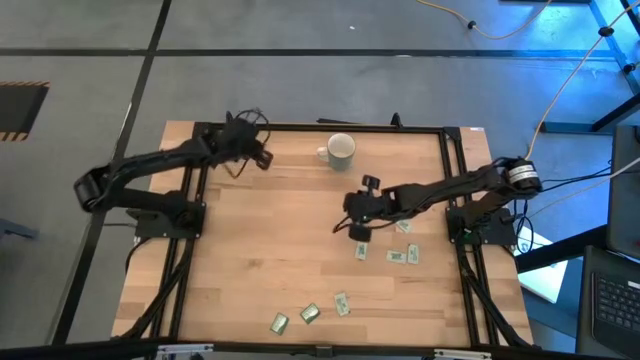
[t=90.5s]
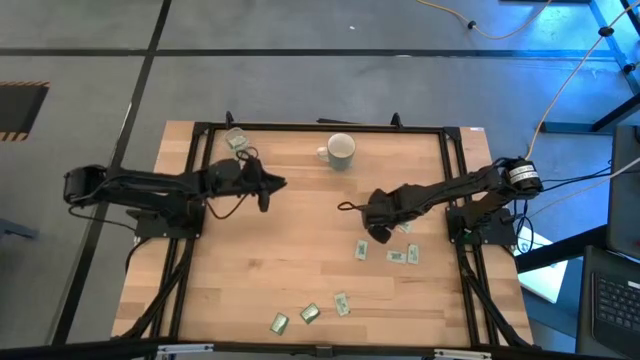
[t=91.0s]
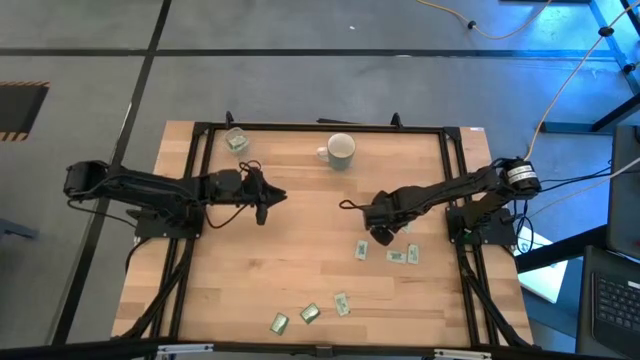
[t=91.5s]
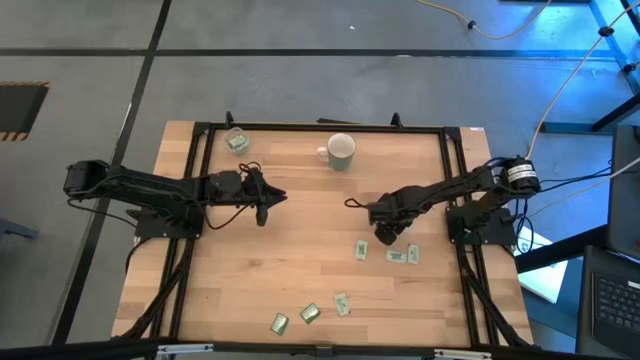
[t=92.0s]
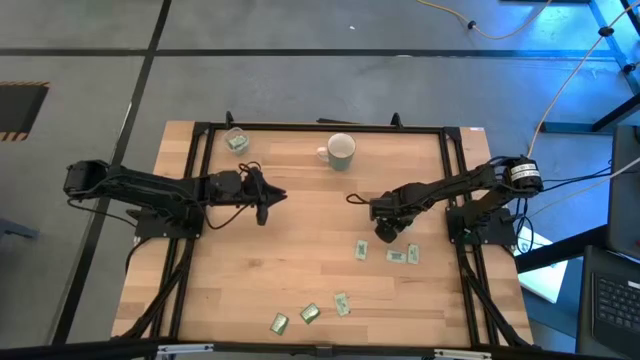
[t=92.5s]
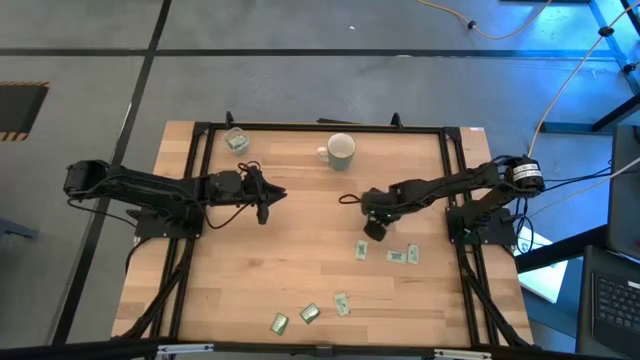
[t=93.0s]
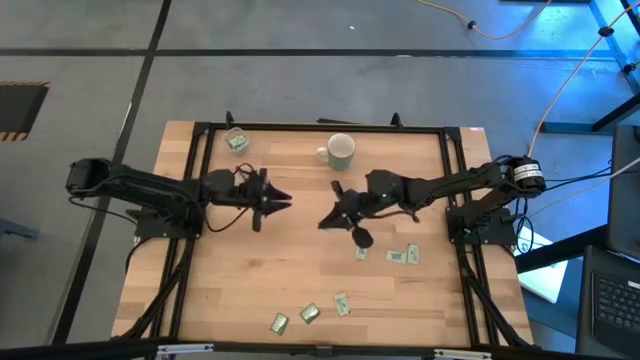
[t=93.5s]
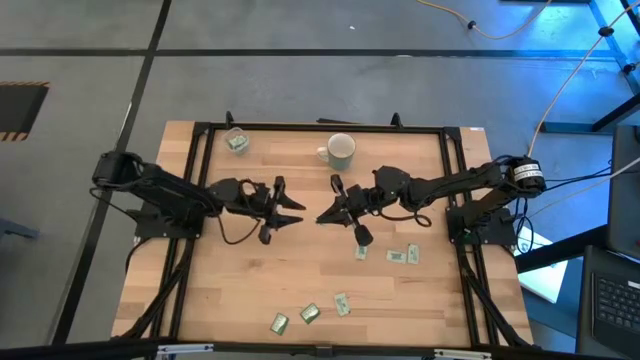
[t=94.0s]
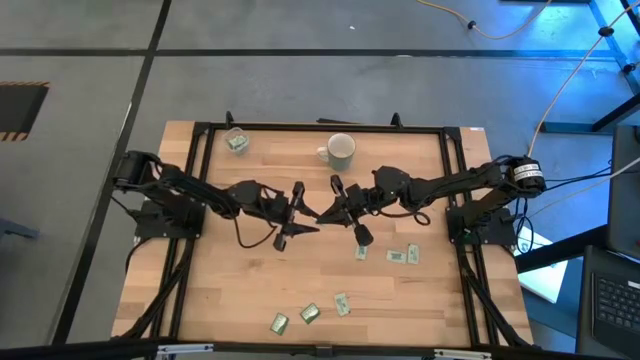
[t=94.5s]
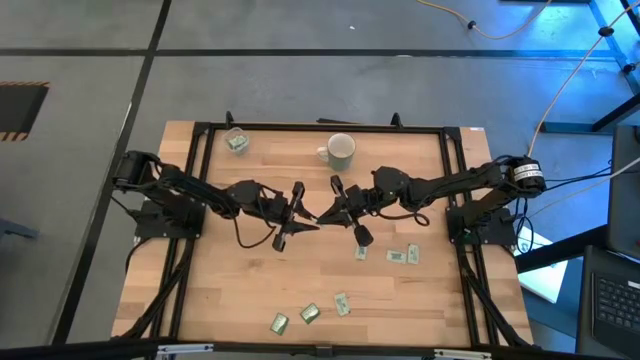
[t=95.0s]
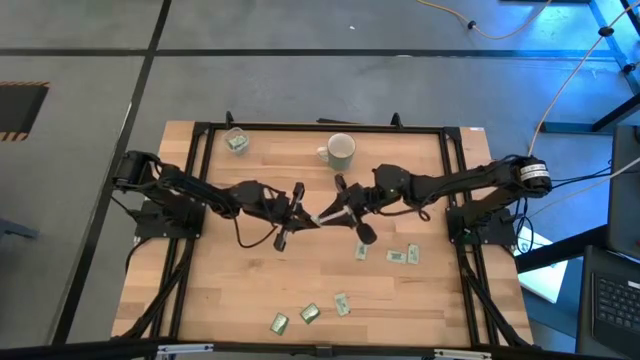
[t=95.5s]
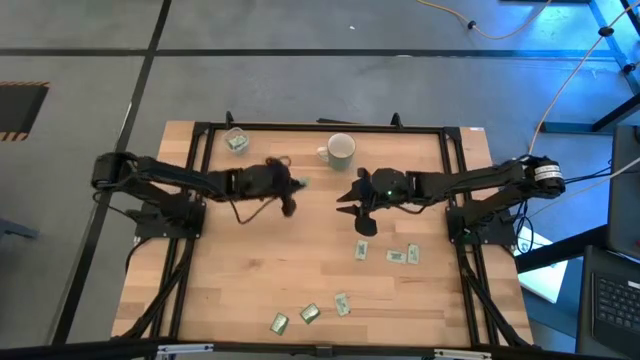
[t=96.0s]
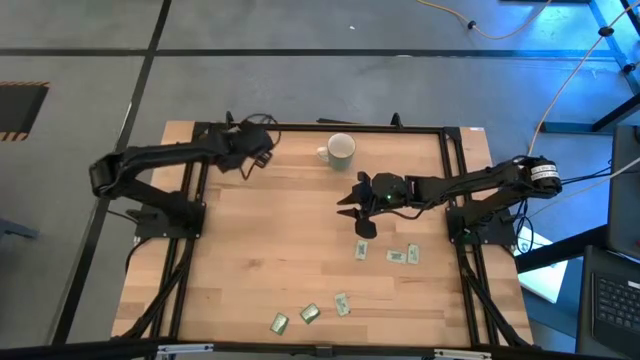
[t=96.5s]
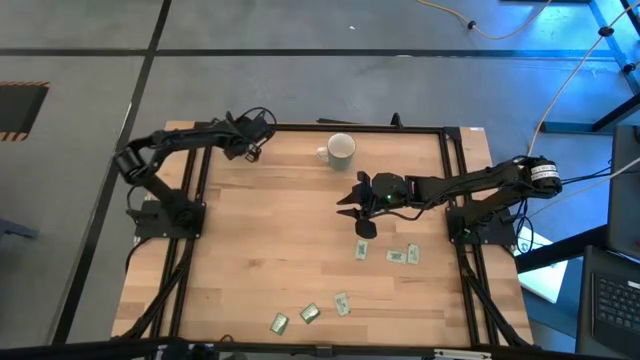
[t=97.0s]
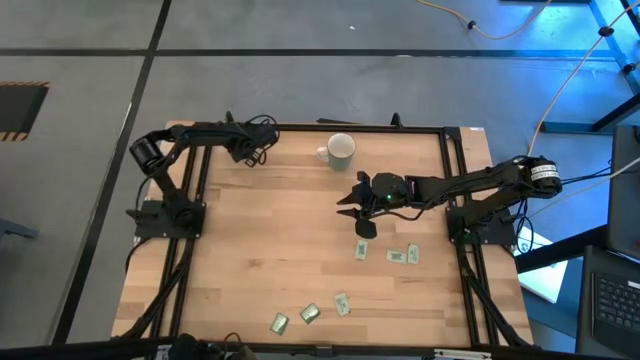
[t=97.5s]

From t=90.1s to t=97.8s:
Task: Pick and place Stevia / Truvia into bins
Put the stevia packet into the transparent bin

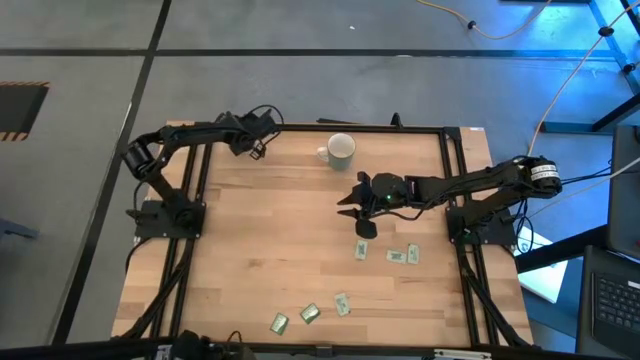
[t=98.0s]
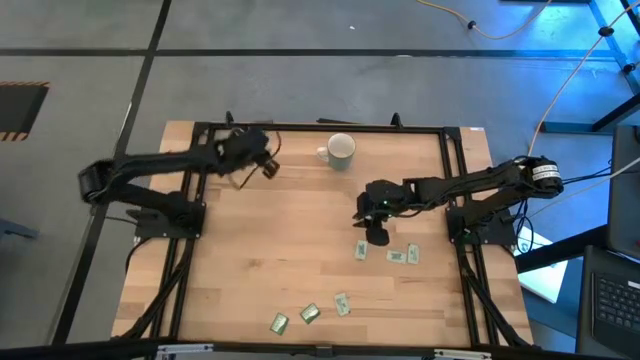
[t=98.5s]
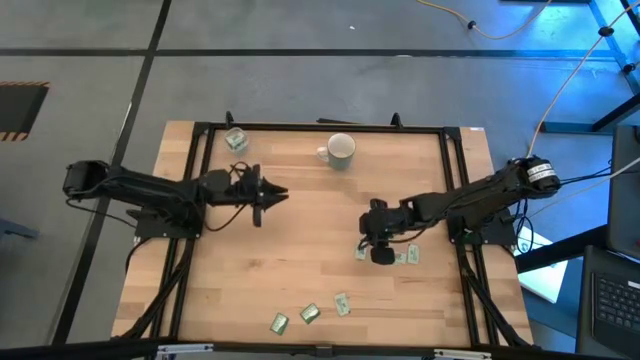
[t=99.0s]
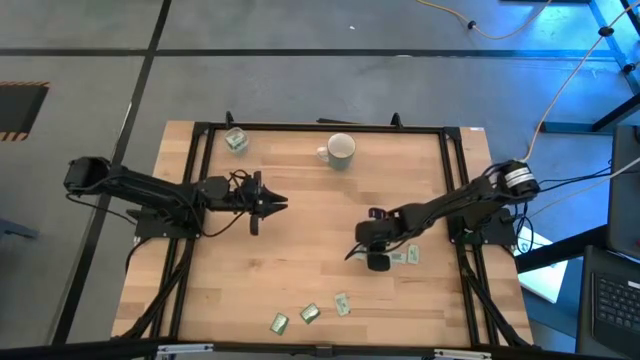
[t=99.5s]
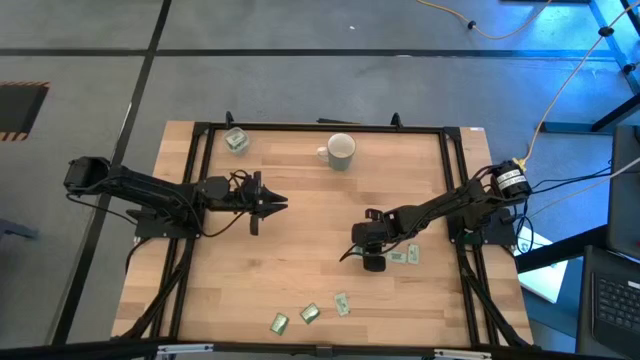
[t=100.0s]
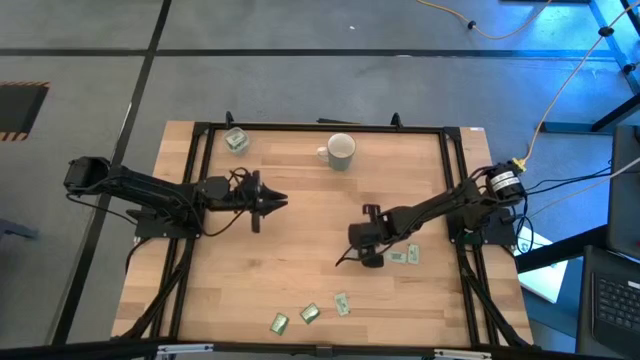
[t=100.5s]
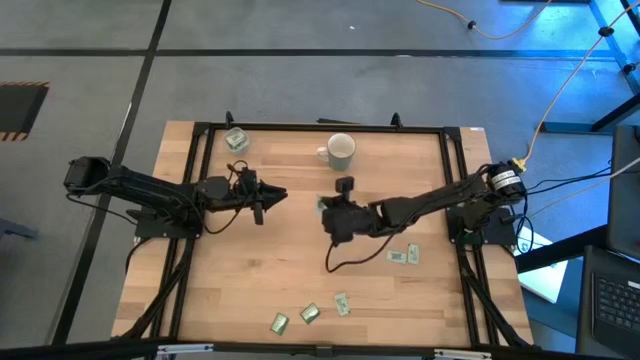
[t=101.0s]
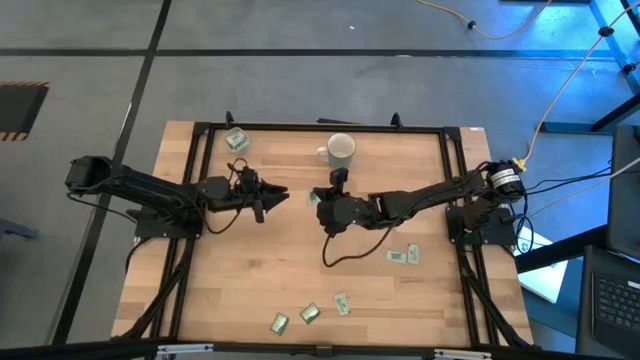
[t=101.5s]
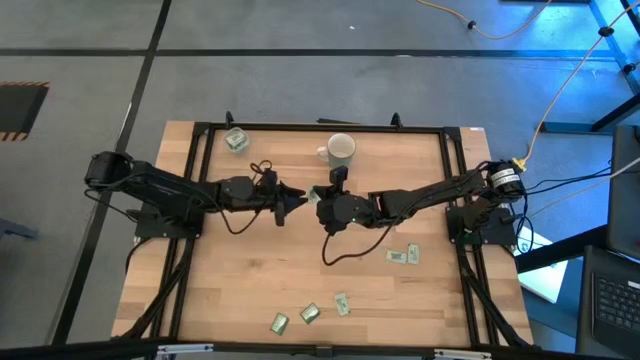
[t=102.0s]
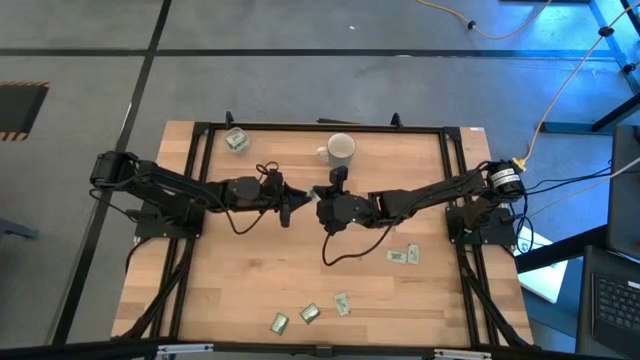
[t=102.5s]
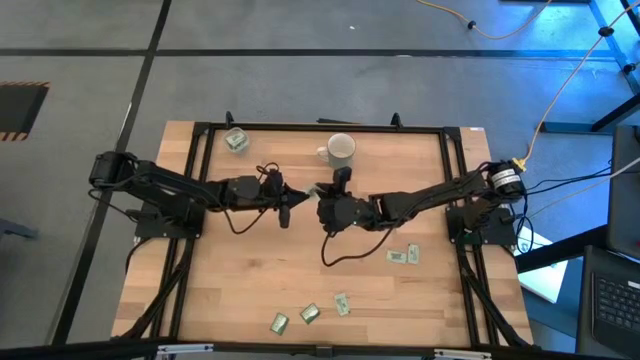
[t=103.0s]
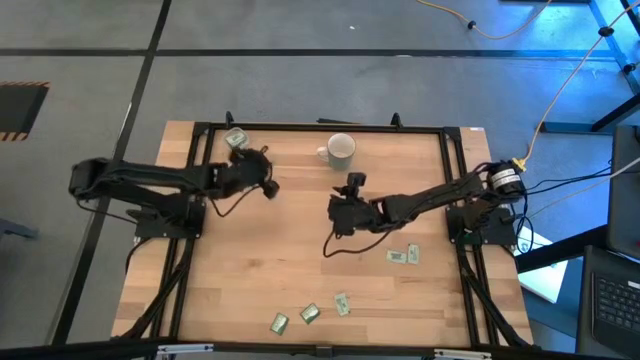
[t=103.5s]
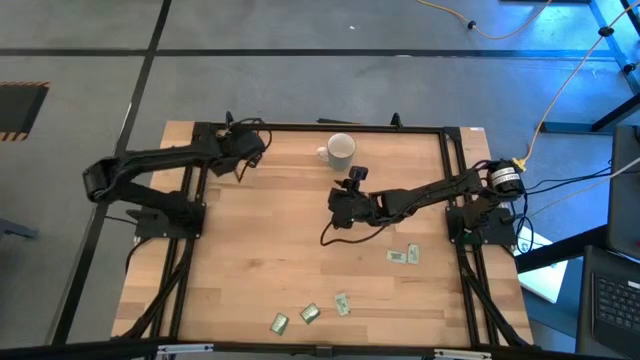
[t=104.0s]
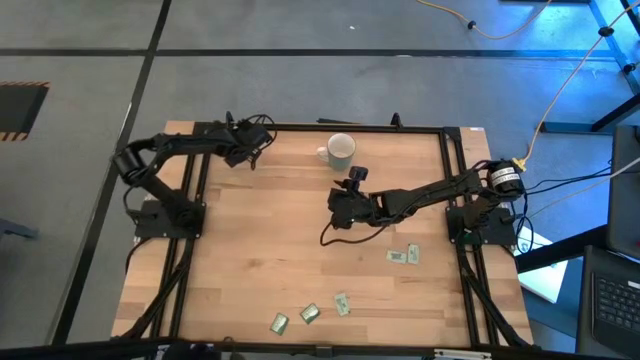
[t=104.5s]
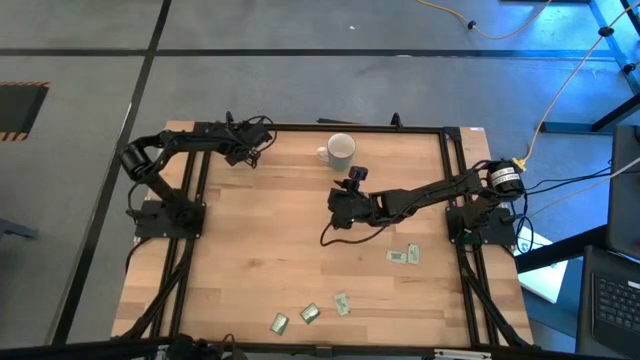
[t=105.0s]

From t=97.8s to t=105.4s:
Put the stevia packet into the transparent bin

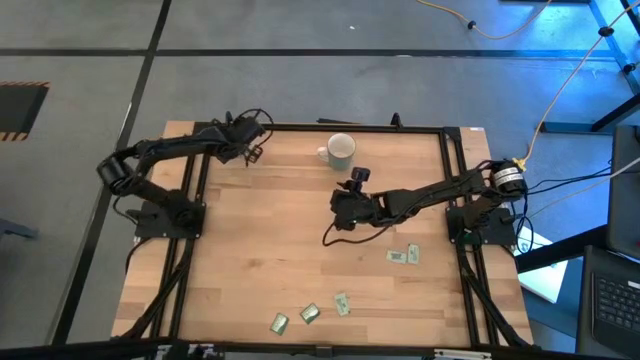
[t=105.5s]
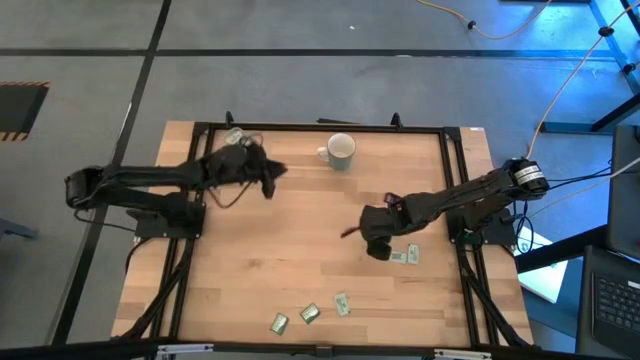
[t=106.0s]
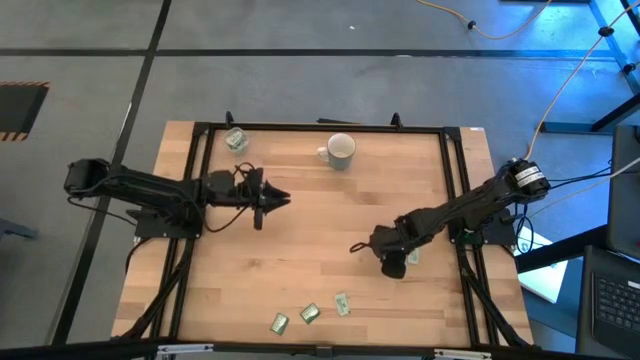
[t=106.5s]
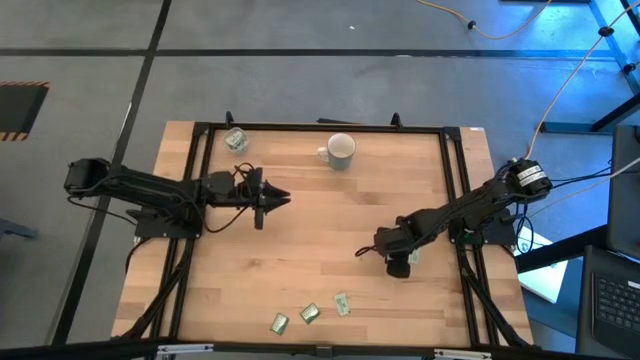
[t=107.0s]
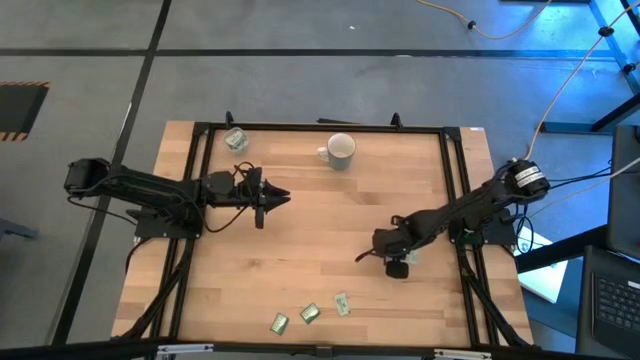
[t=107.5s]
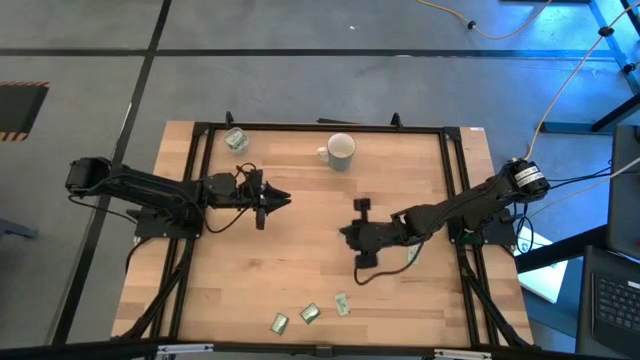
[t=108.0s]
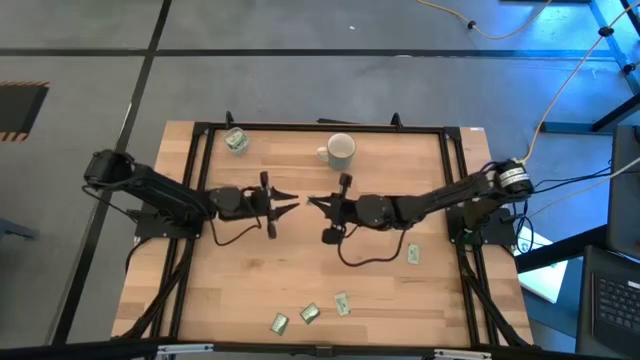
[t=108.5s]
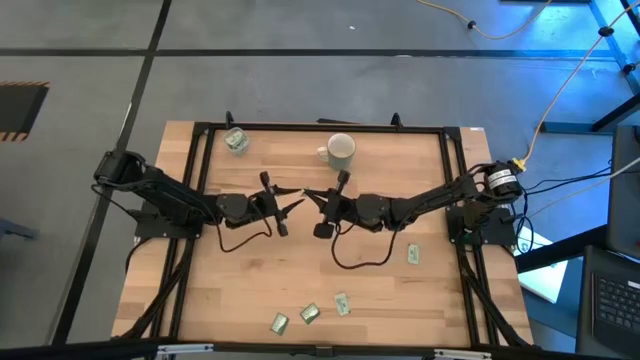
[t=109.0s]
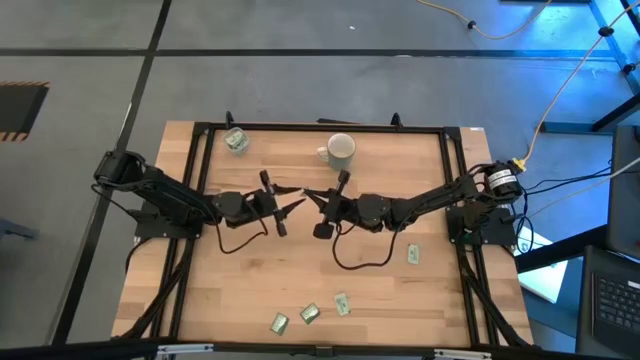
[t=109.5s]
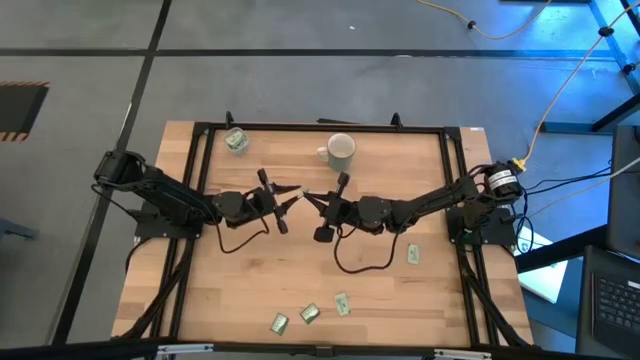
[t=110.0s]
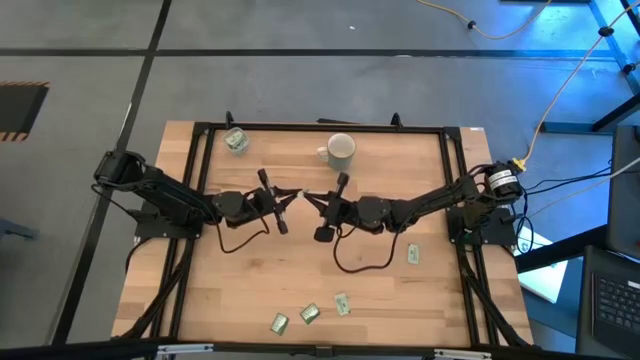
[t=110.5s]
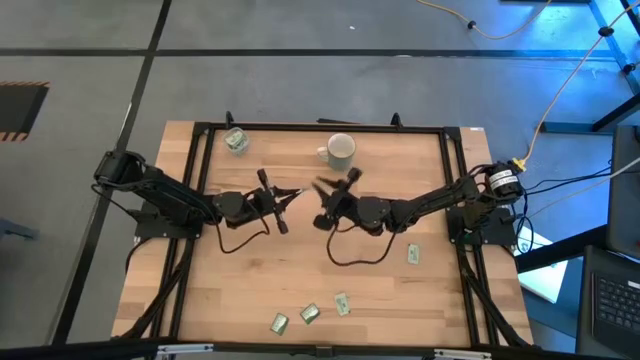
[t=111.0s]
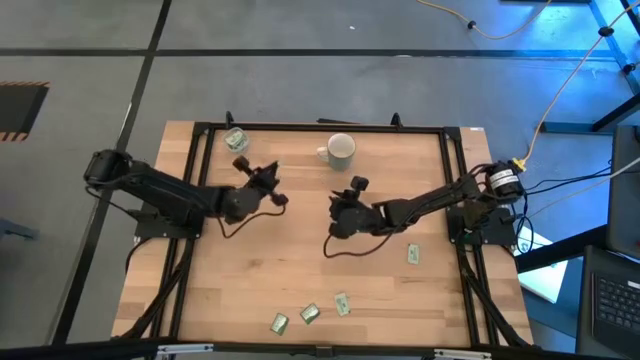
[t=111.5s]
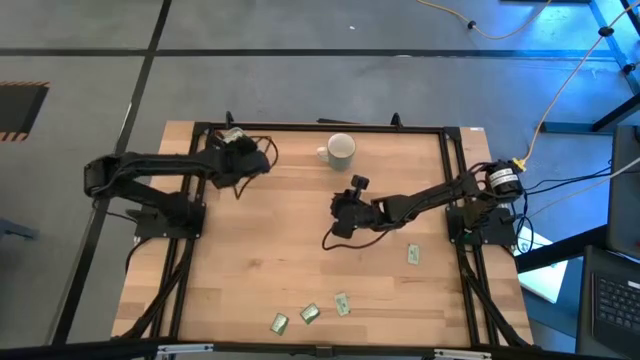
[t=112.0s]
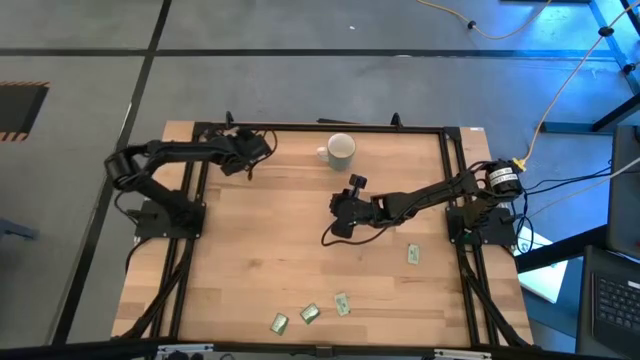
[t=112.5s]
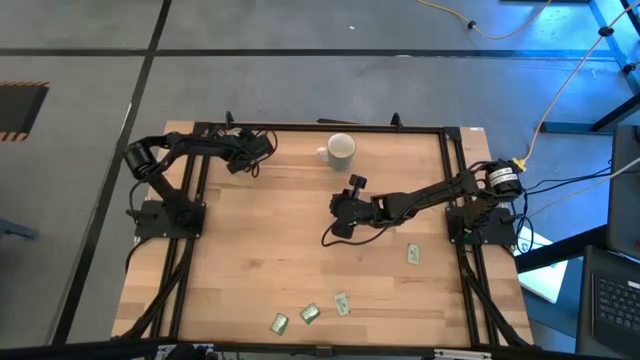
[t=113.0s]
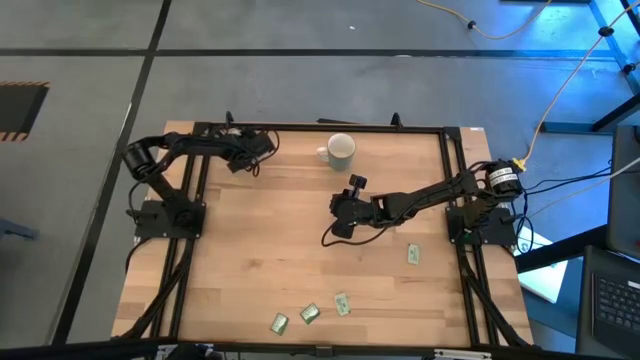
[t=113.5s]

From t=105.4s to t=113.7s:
Put the stevia packet into the transparent bin
